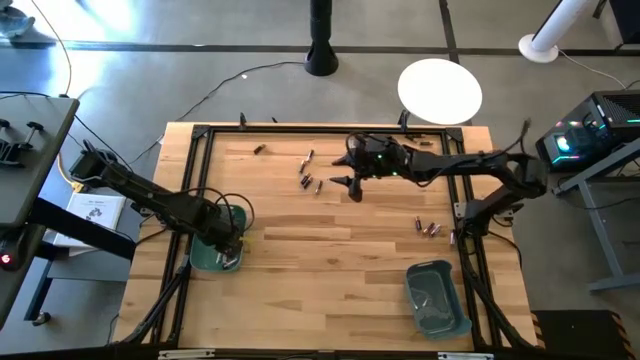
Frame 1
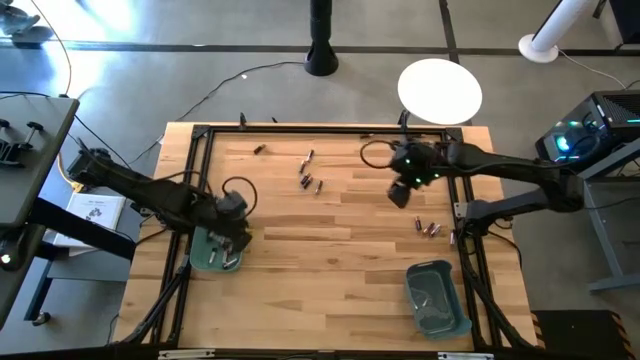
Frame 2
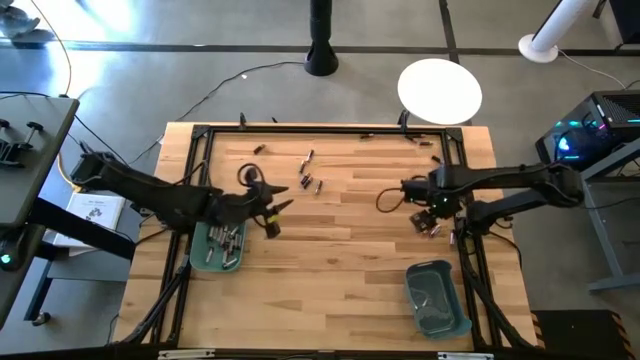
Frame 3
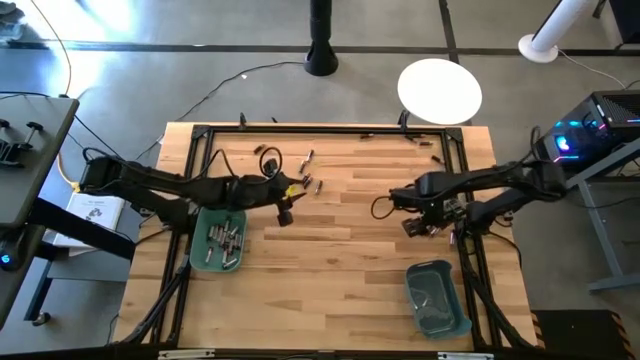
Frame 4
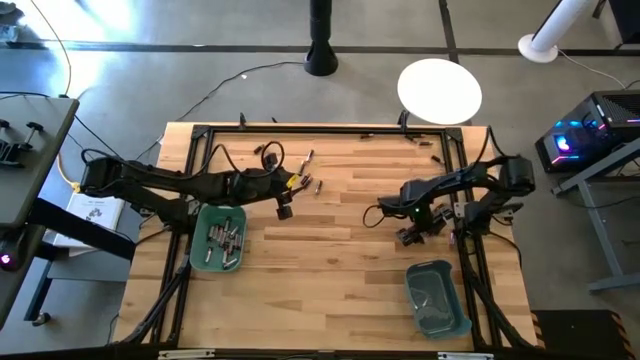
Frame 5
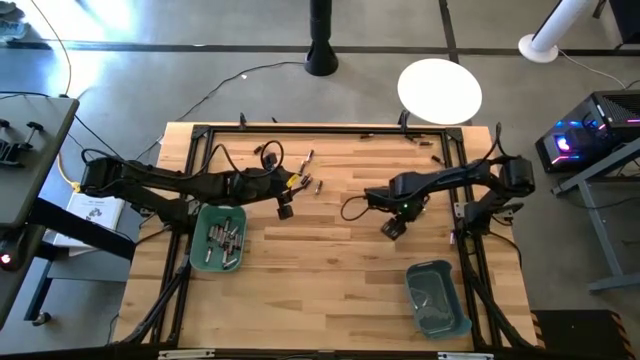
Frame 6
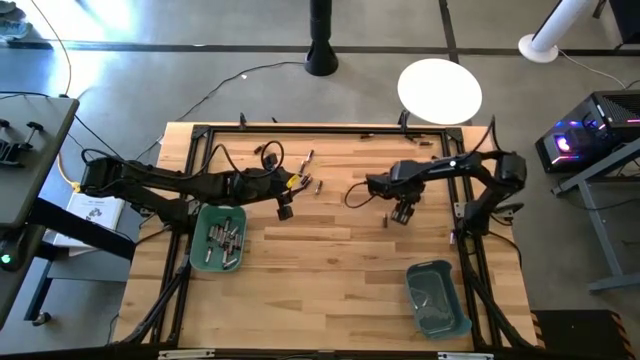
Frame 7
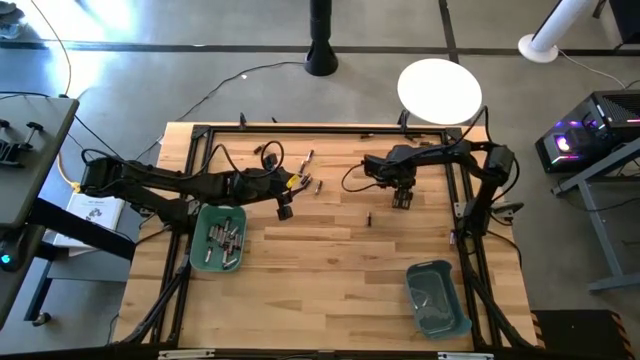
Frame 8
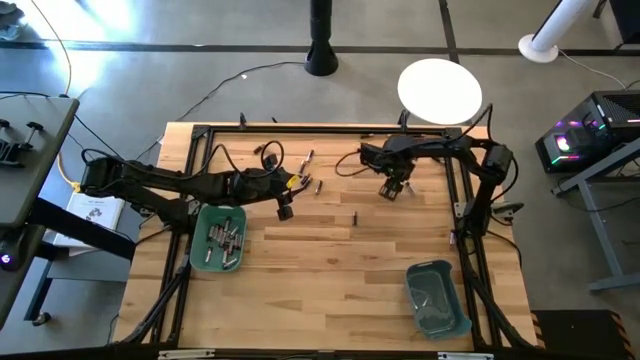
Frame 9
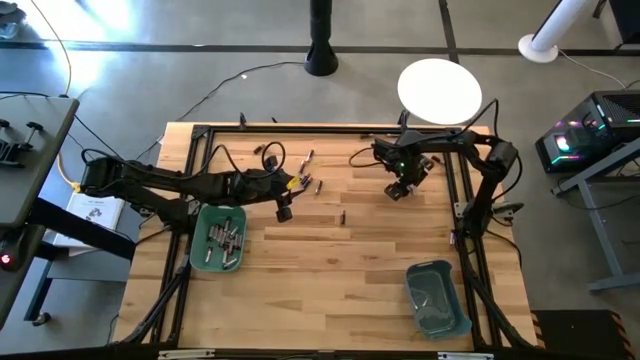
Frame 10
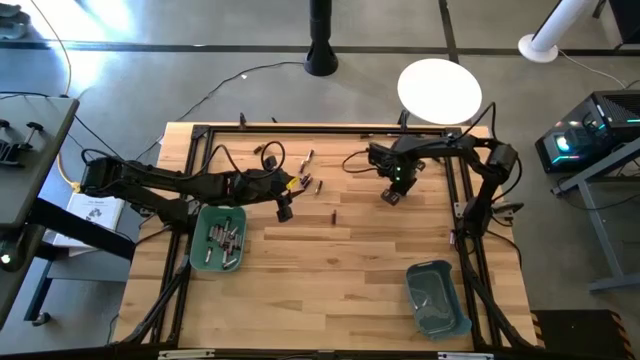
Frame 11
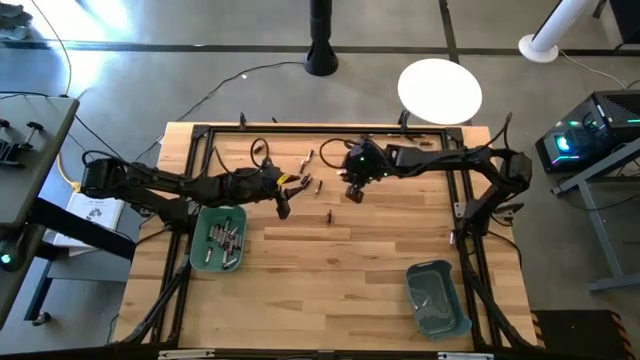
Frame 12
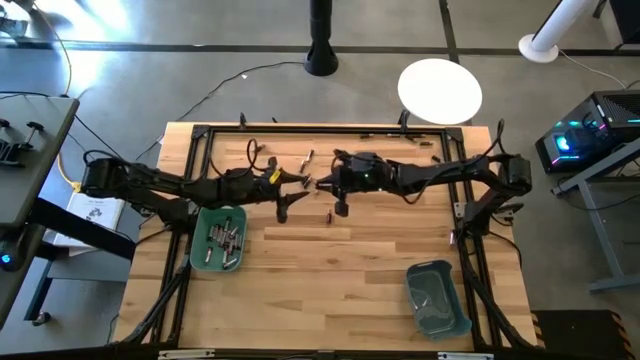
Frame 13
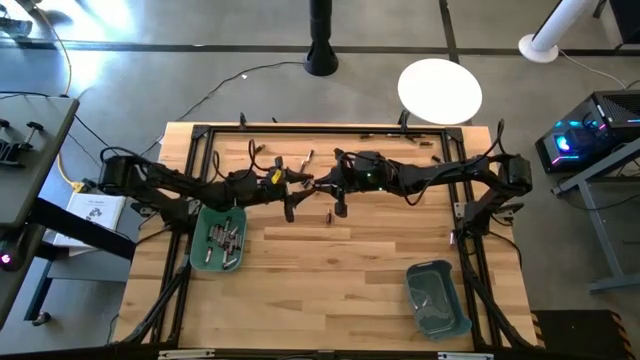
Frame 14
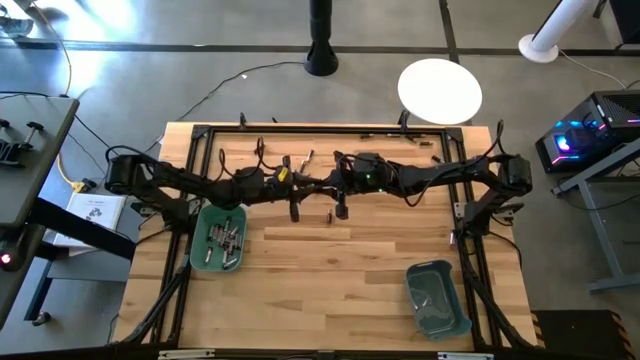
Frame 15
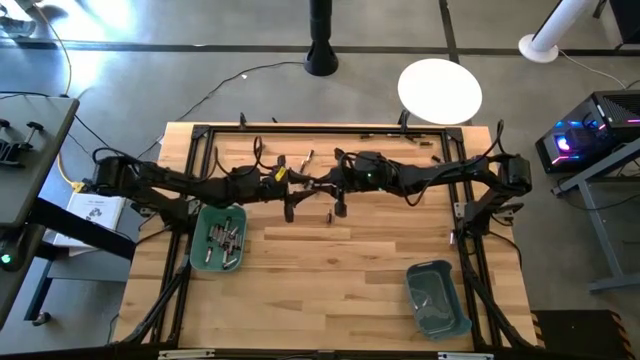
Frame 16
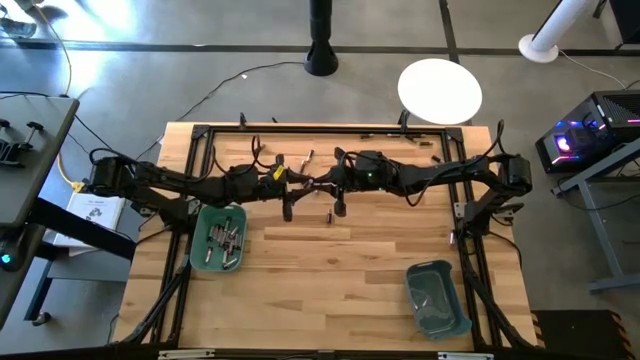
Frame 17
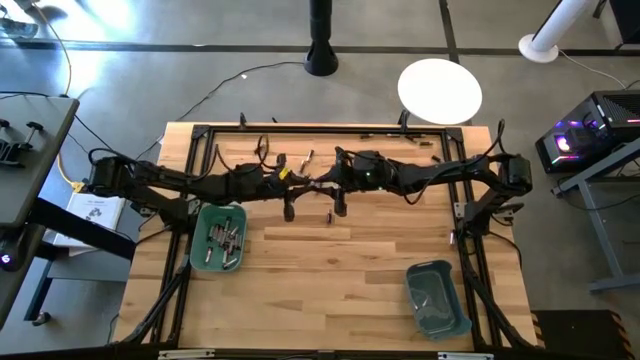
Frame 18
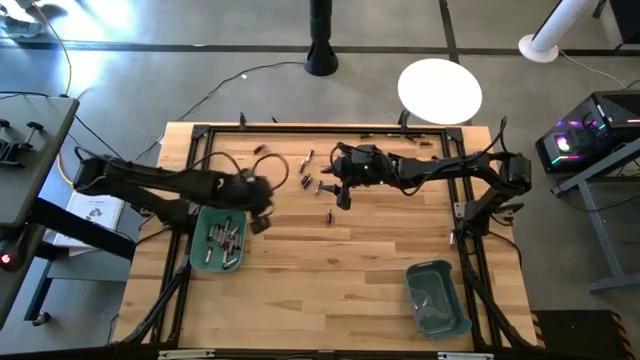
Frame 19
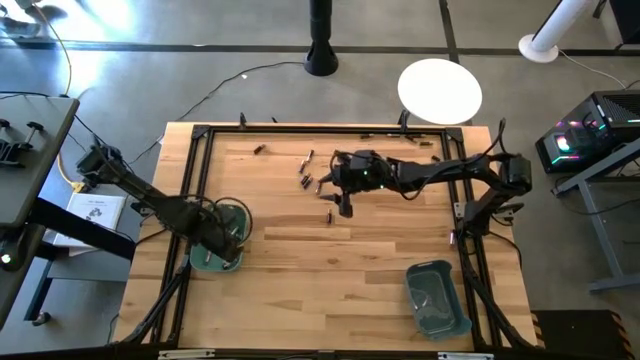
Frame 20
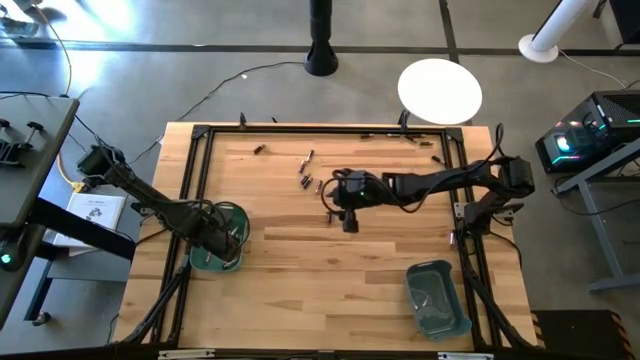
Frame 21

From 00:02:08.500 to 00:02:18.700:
Task: Sort batteries
Put the silver battery into the green bin

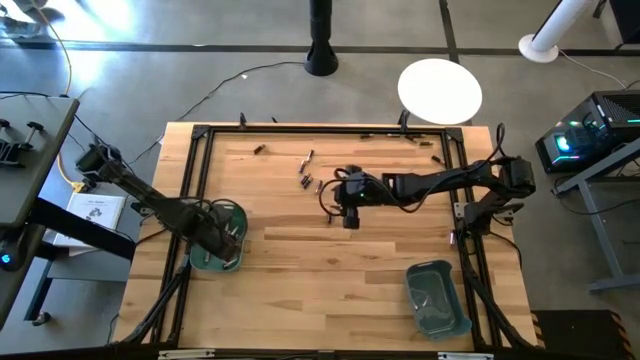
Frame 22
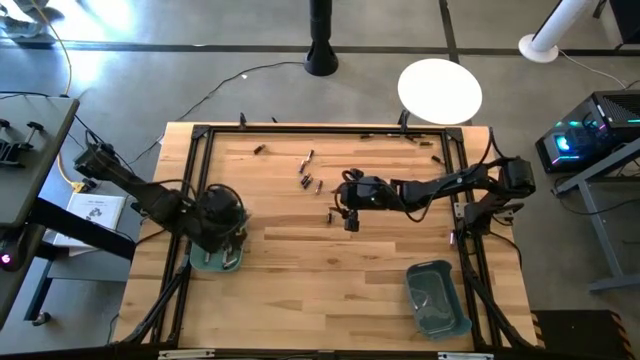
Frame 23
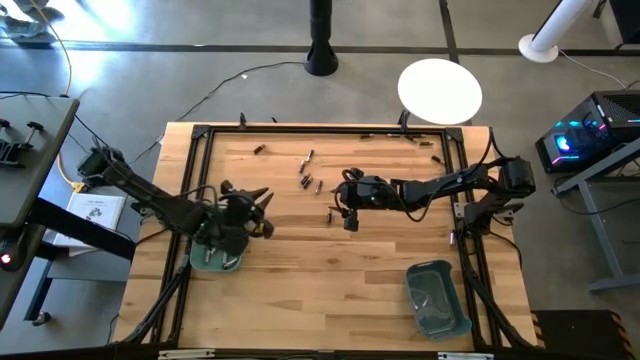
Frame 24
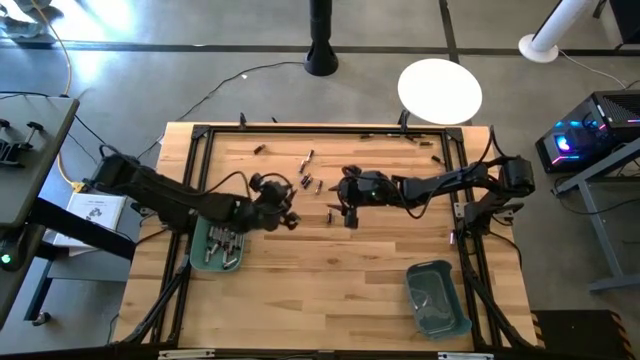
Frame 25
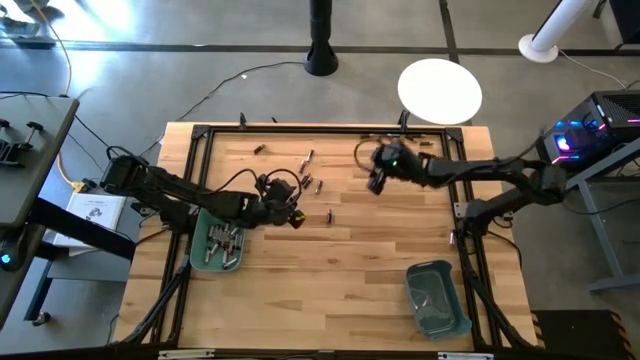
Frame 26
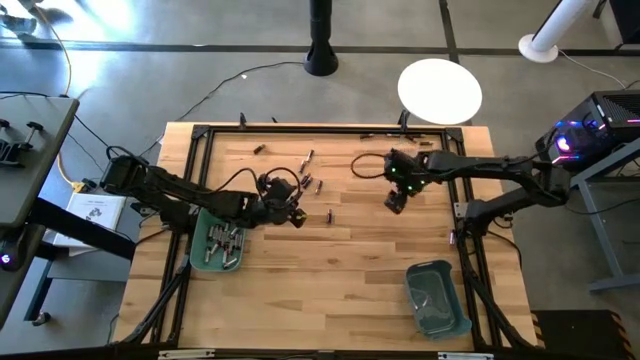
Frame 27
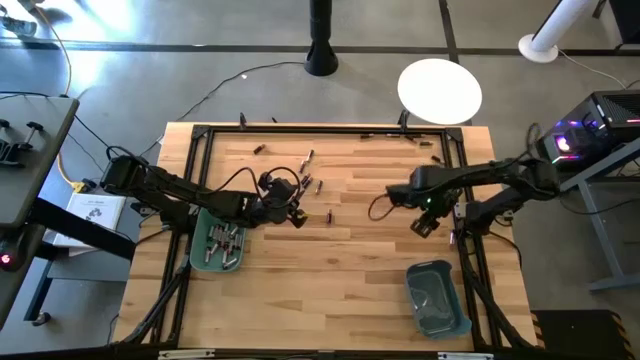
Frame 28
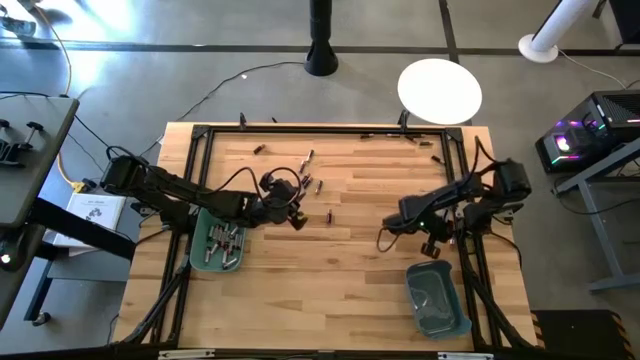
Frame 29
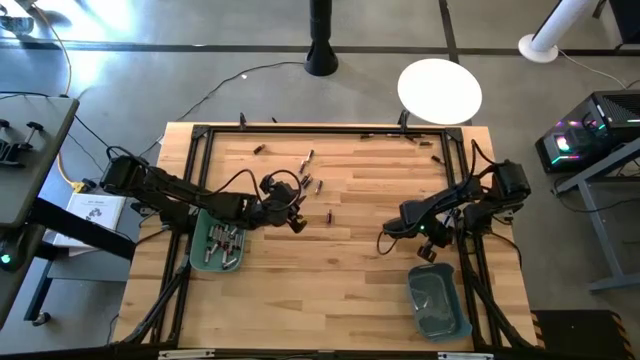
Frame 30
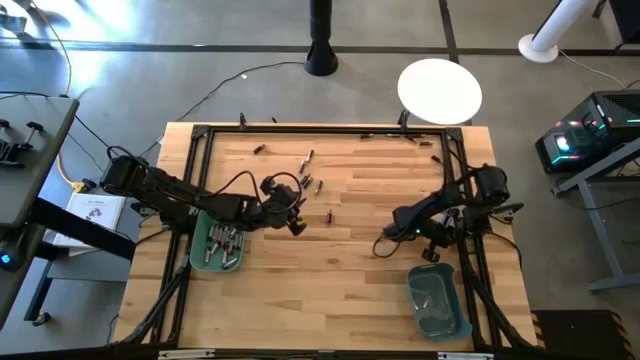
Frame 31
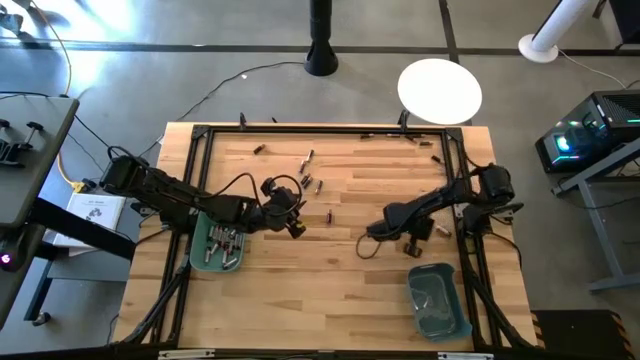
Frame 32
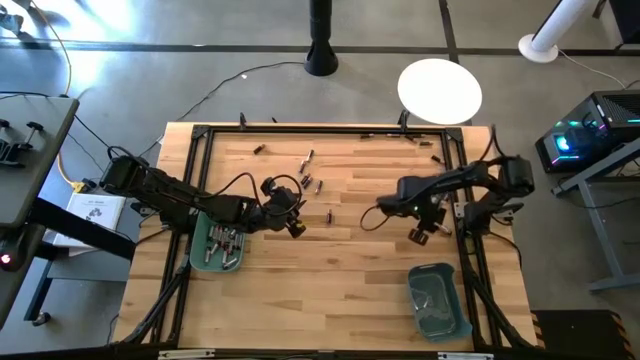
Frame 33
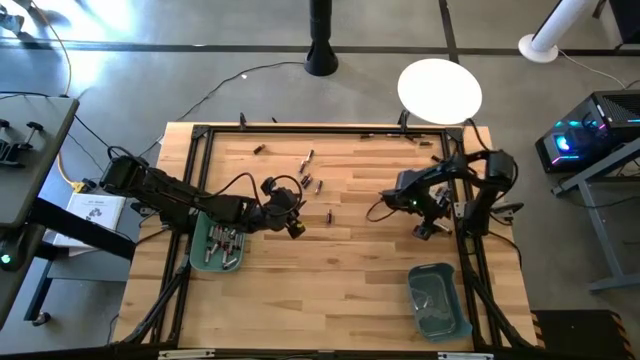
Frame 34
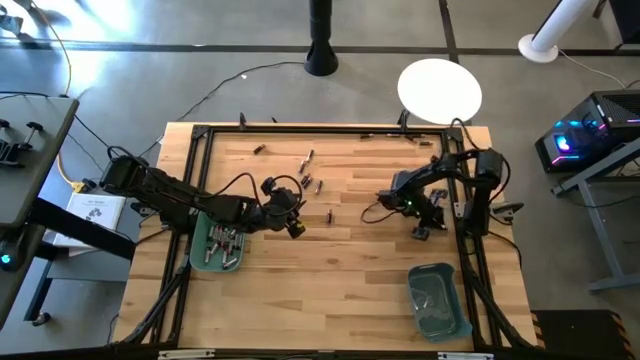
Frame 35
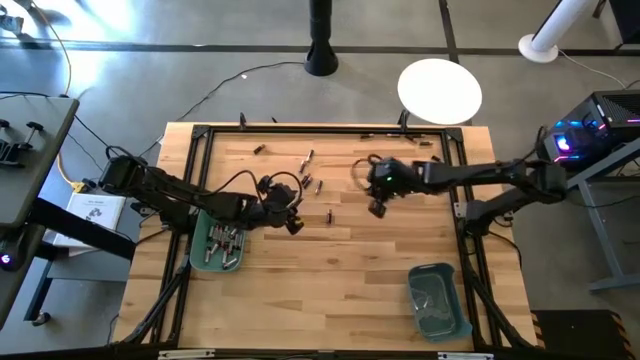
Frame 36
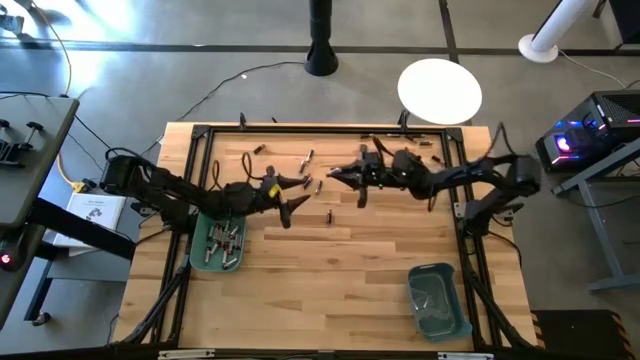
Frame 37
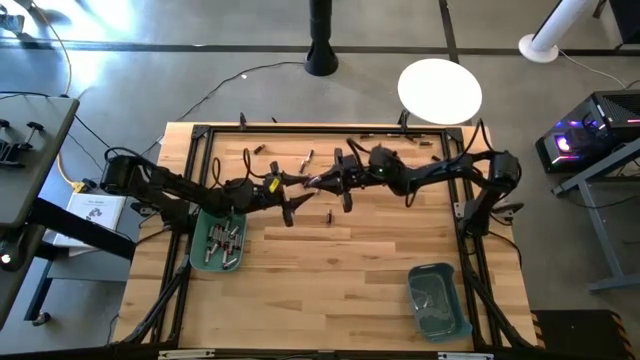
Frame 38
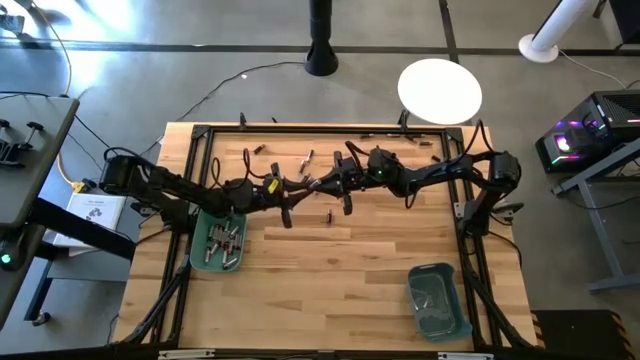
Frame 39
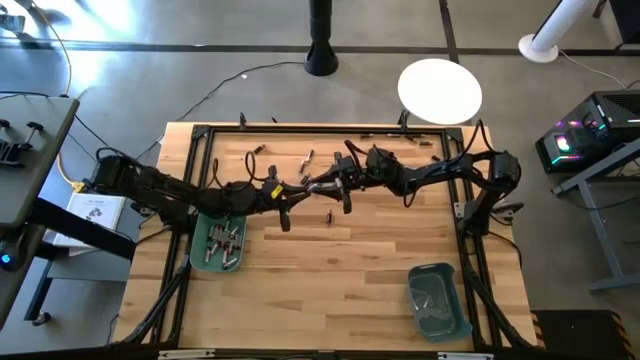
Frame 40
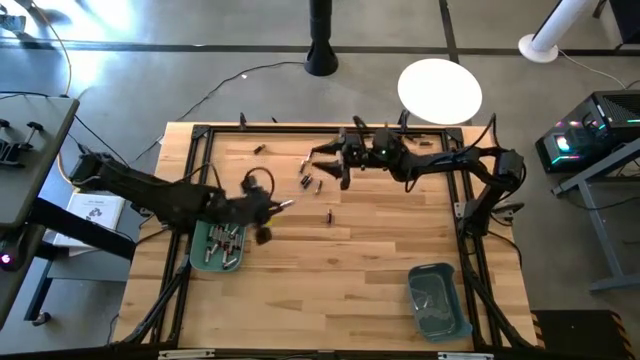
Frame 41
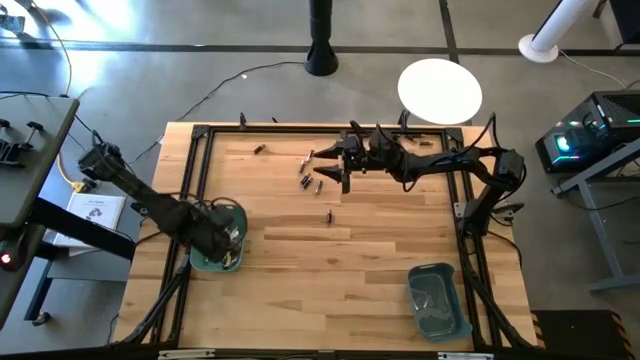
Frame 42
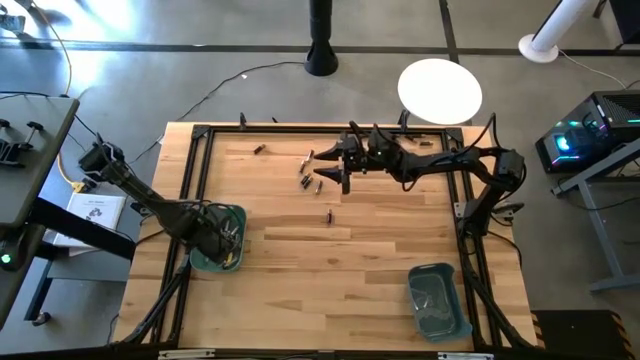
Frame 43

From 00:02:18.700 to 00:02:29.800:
Put the silver battery into the green bin
